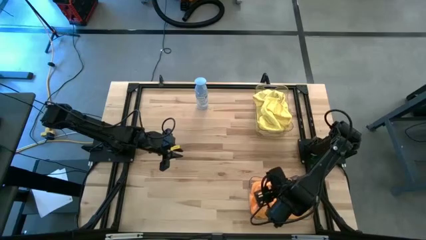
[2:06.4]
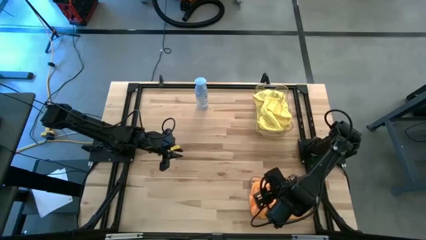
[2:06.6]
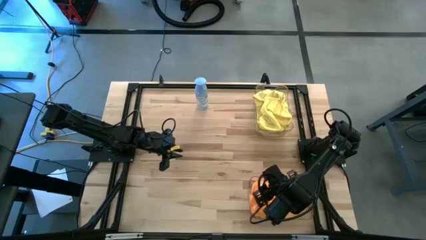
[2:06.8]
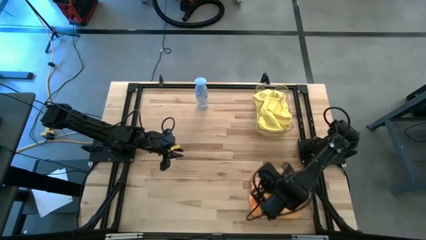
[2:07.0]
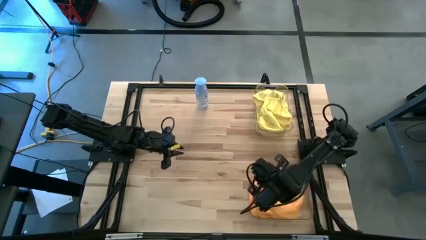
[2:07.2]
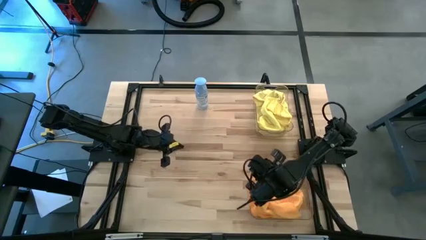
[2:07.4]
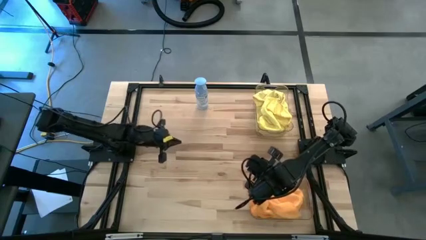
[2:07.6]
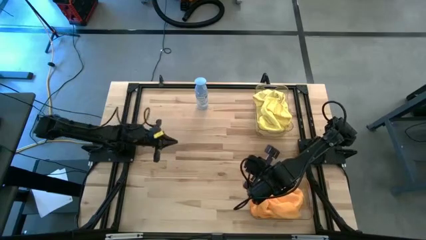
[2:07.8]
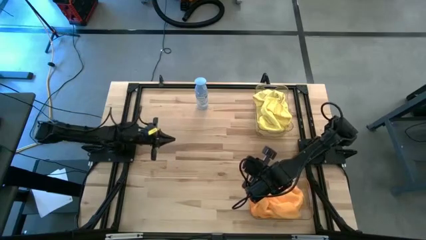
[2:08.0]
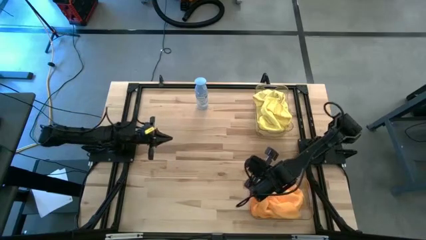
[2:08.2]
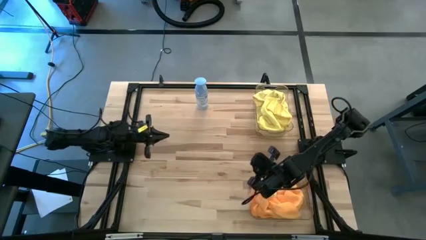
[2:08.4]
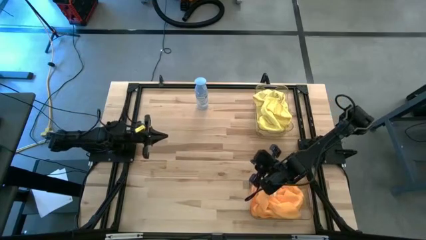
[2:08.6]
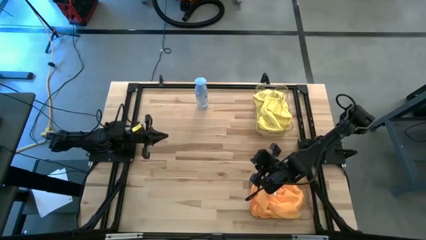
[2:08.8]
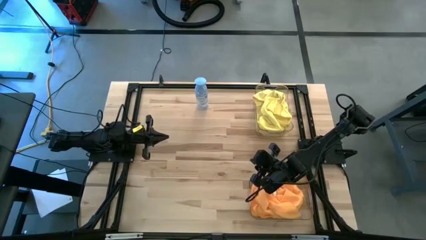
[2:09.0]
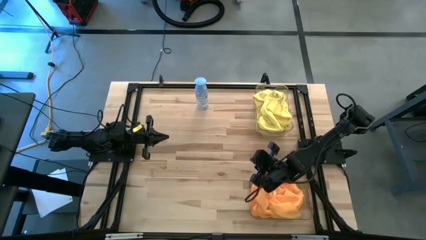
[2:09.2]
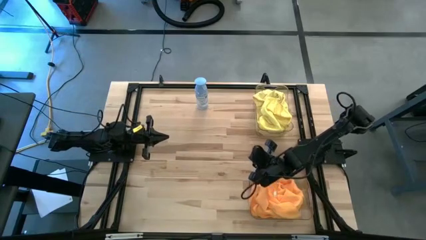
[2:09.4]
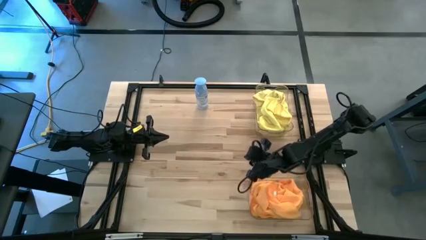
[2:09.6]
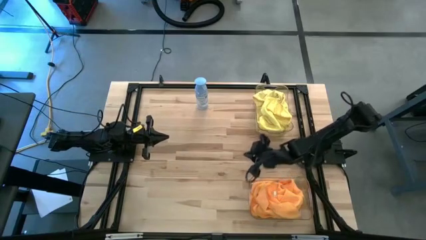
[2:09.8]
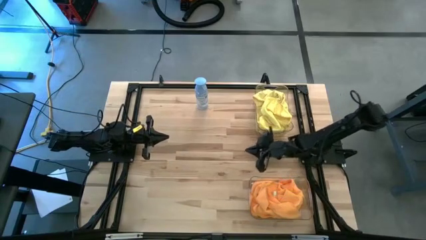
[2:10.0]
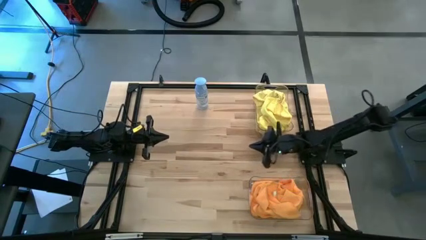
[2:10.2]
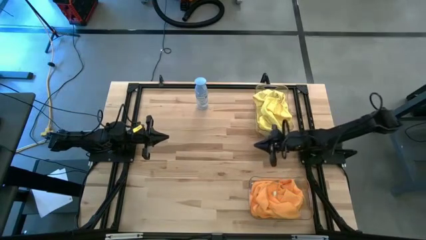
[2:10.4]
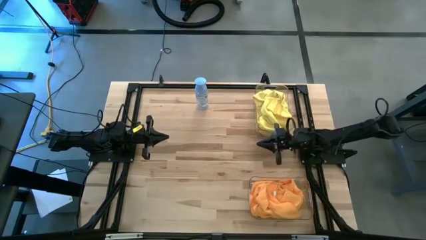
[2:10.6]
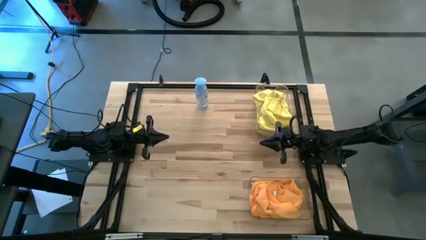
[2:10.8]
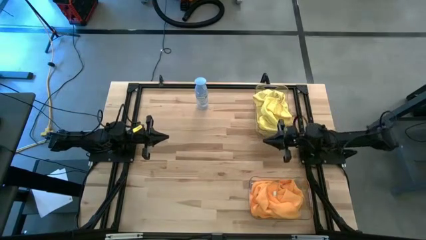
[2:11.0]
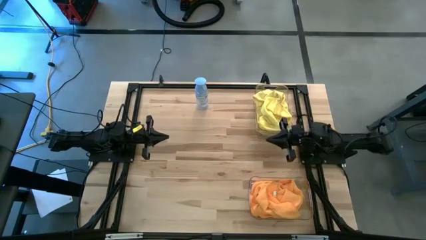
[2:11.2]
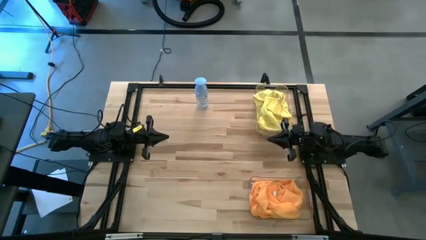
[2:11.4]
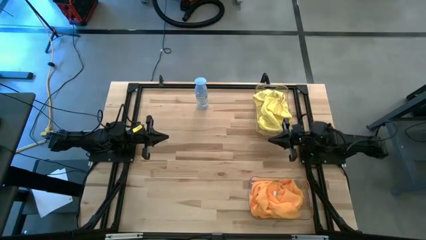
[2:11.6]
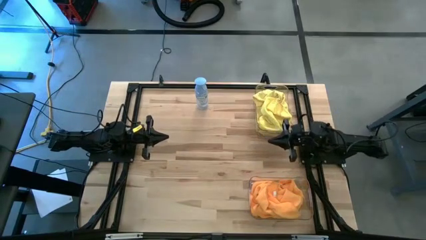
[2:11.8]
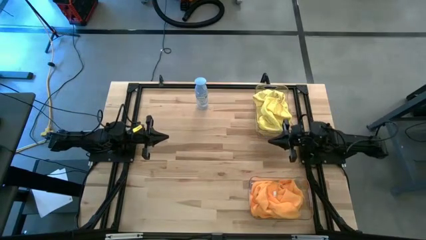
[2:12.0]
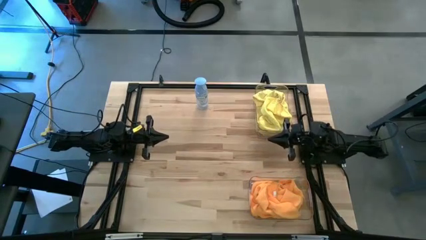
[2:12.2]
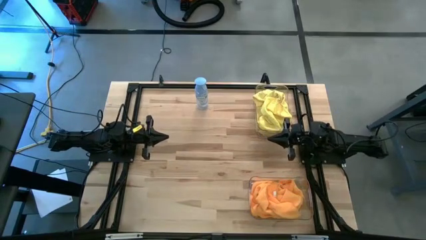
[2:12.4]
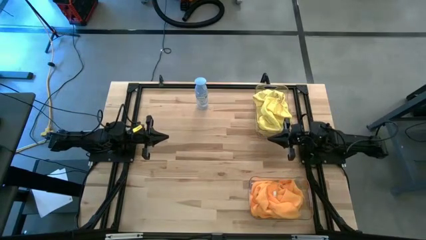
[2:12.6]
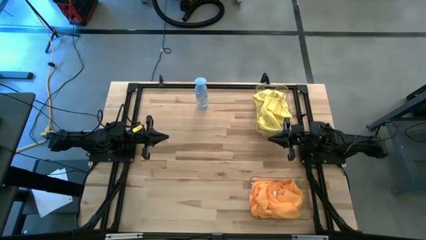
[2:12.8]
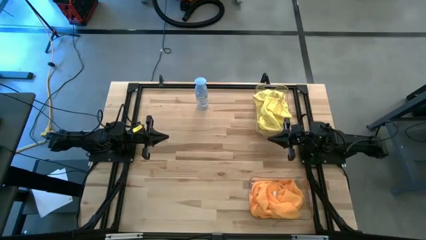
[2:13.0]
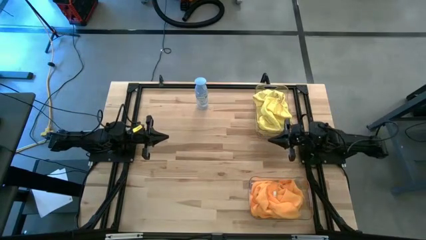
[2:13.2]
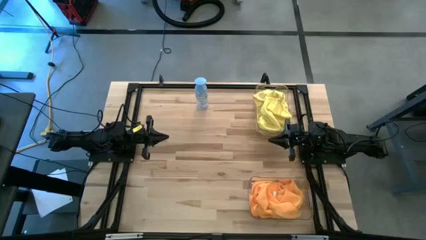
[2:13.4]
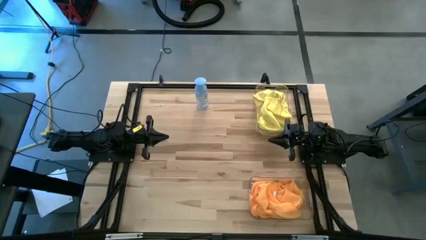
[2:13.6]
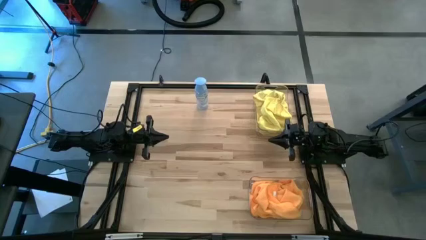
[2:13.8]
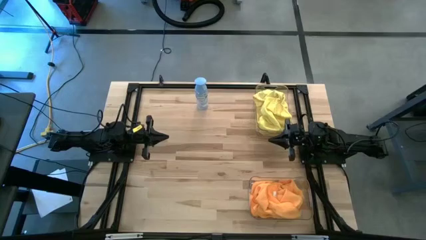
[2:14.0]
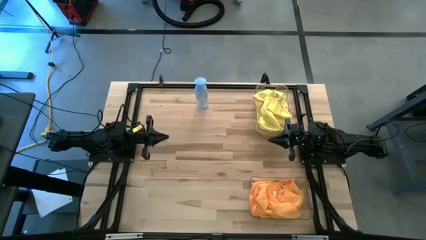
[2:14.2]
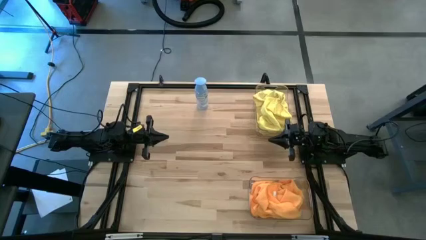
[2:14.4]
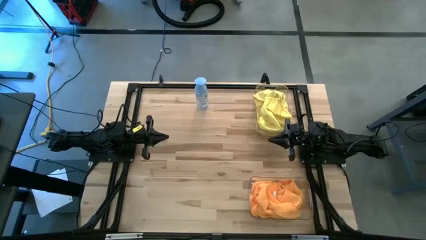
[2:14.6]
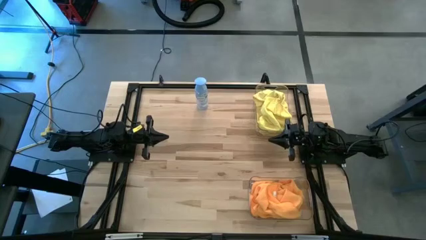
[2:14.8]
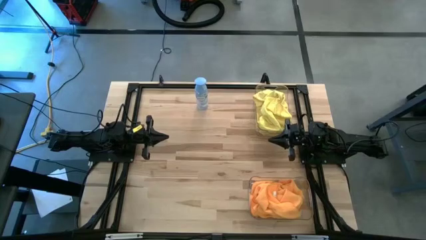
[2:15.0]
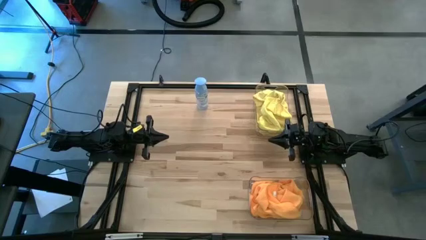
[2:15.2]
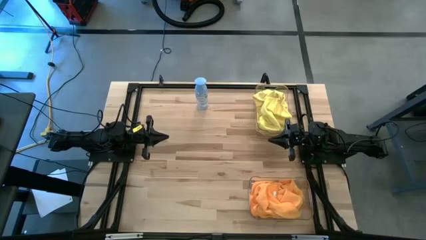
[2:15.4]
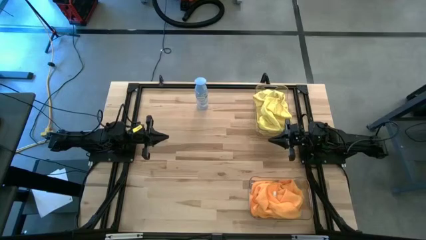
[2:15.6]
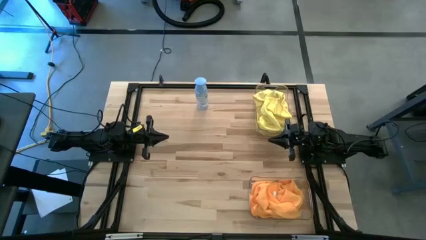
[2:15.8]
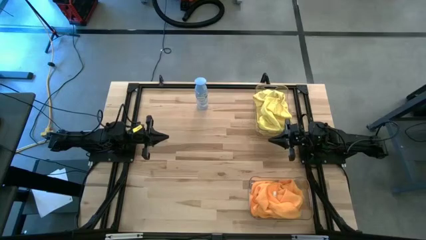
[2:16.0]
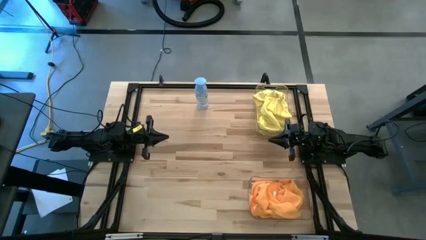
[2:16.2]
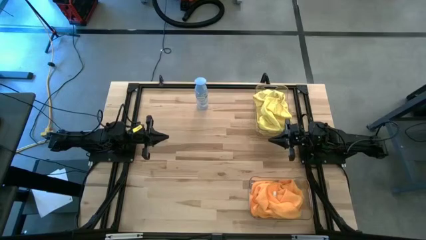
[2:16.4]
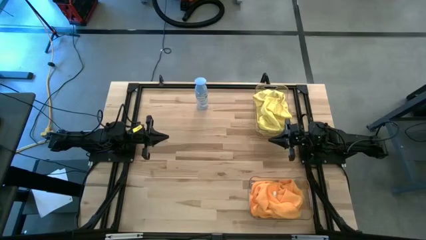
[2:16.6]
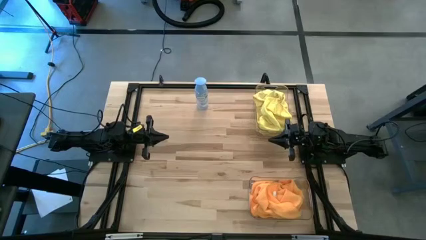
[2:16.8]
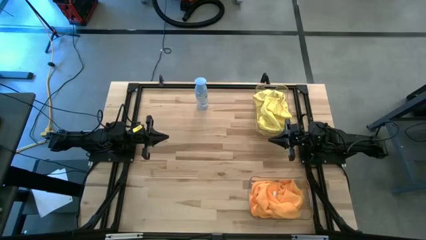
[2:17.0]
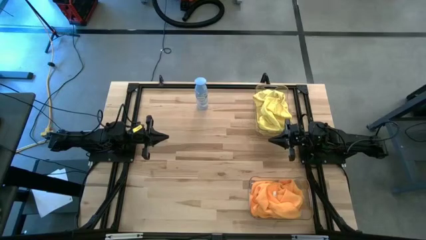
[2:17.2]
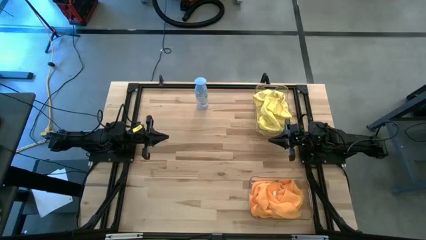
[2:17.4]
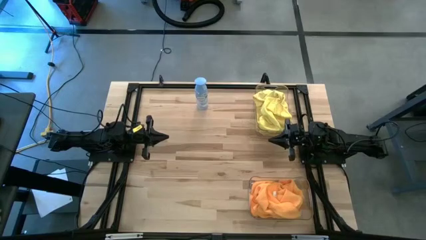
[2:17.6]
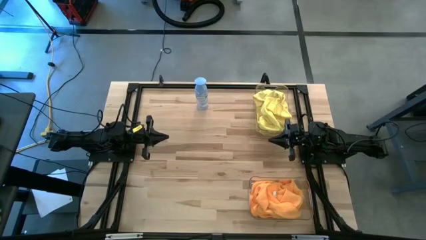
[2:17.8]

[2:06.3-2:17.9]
Task: Sort microfiber towel by color & place in baskets
Return to Home Position

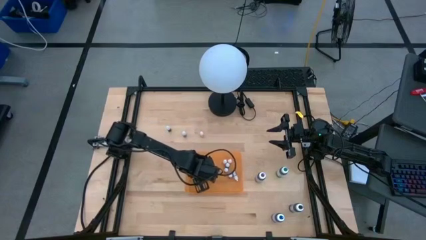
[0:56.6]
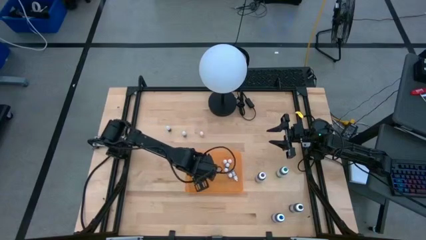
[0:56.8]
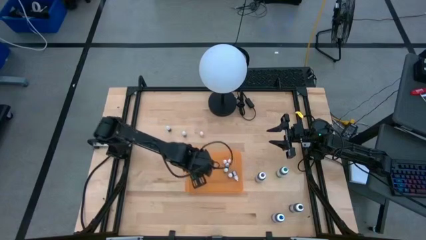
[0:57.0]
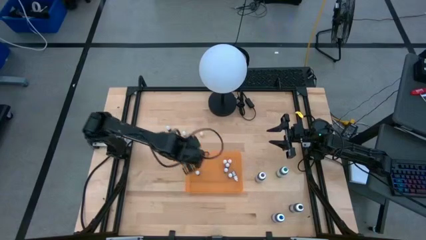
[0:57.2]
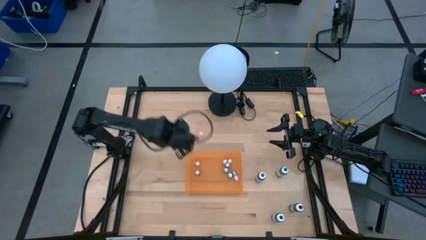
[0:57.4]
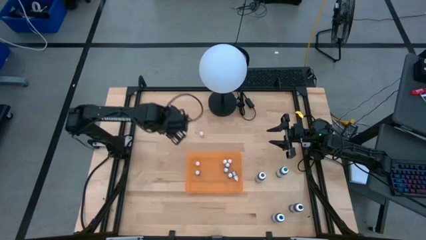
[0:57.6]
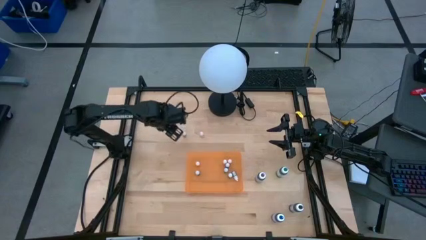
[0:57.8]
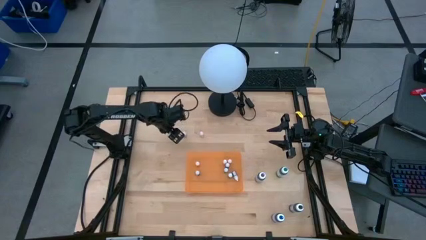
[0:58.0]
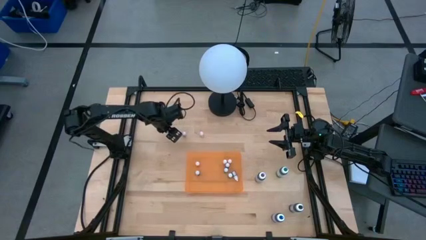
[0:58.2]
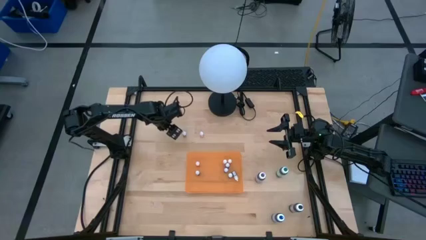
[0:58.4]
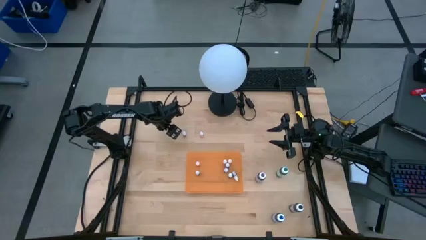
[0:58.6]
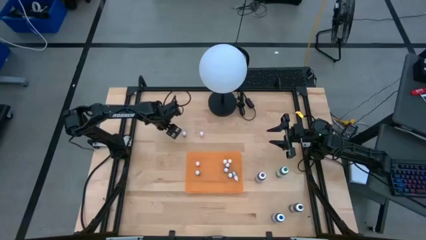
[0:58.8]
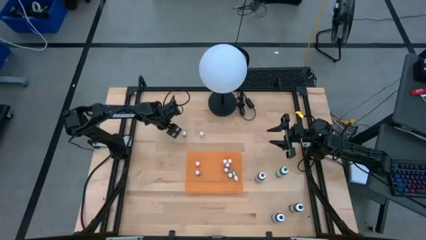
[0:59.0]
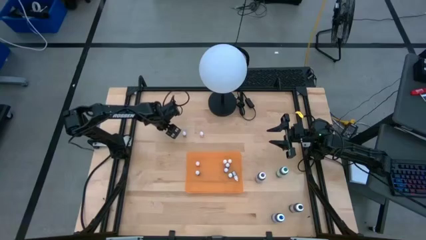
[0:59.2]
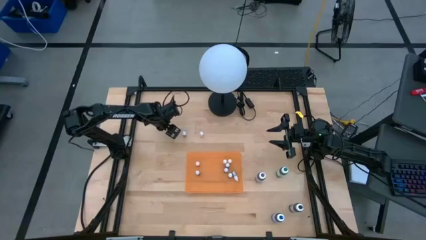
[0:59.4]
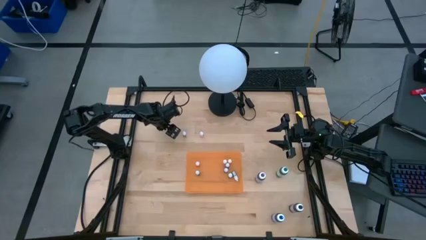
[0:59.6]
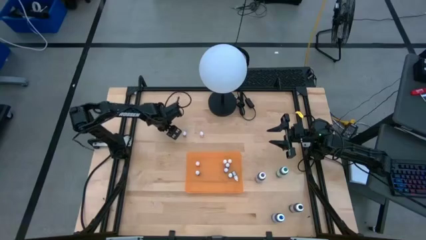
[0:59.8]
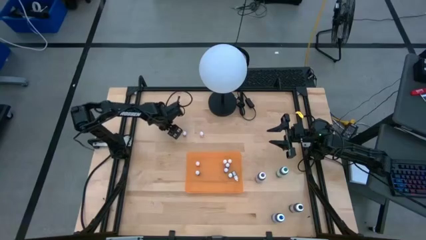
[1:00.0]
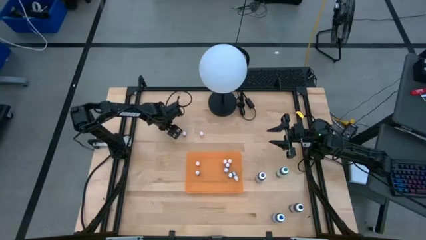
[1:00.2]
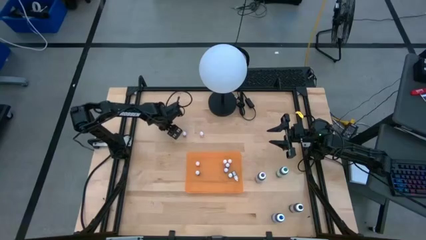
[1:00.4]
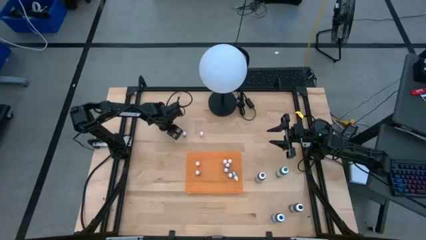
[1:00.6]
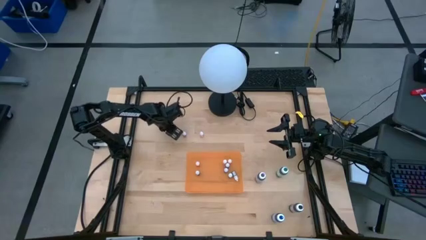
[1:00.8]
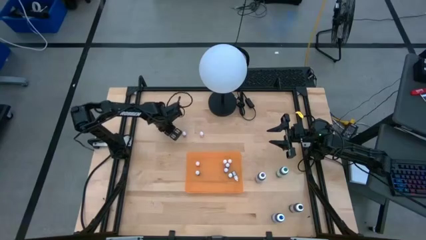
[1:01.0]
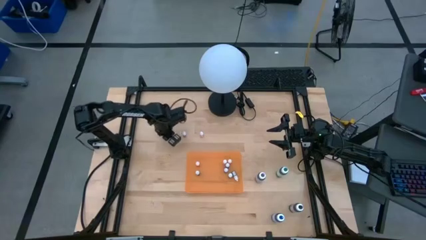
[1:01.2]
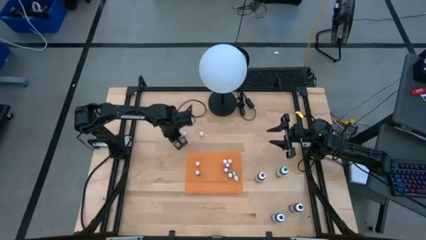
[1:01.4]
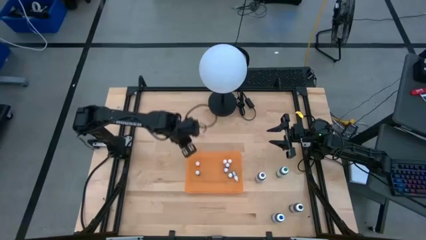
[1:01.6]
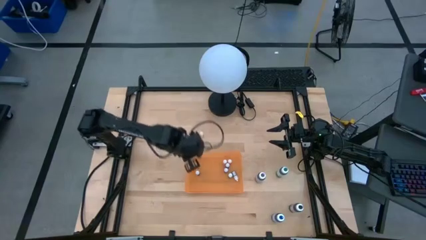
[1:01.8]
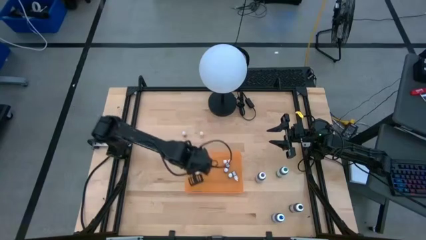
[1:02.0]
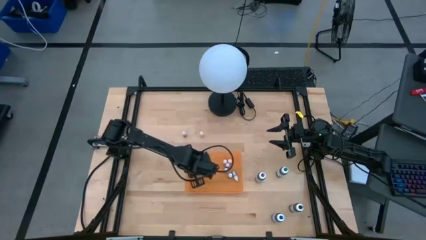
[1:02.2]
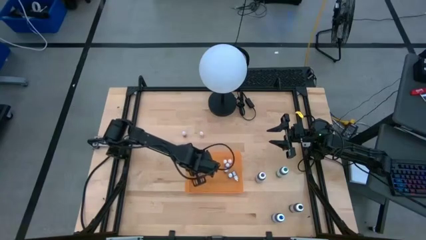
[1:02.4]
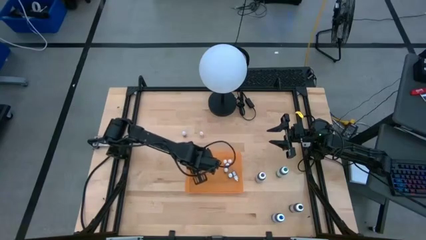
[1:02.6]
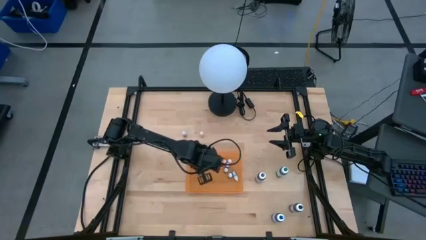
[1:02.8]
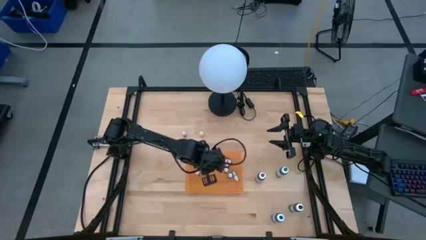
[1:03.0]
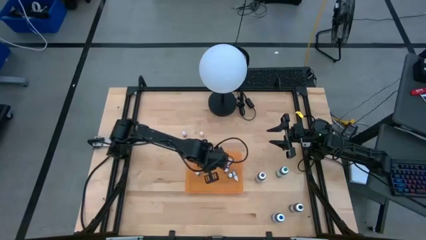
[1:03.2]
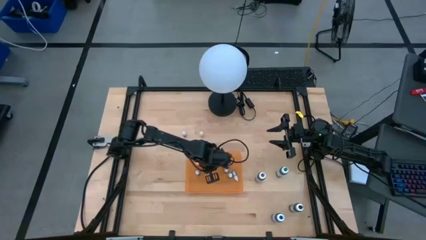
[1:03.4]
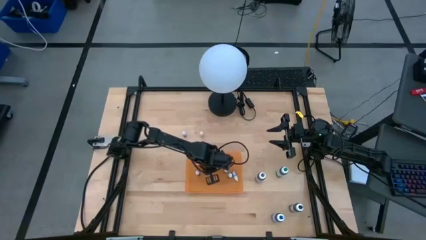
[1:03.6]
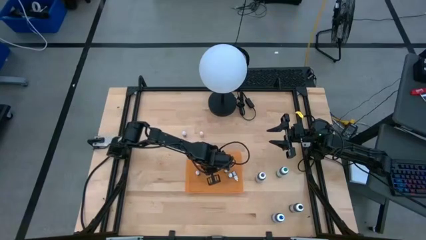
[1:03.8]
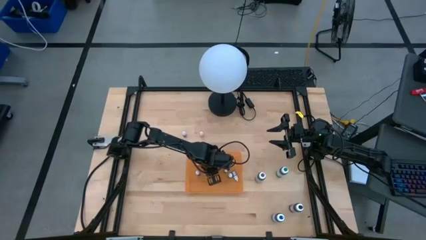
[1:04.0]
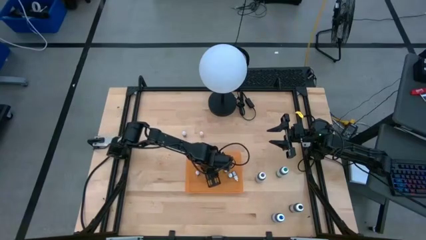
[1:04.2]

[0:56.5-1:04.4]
Task: Pick & Place food coloring
Put the small purple food coloring bottle into the orange container
